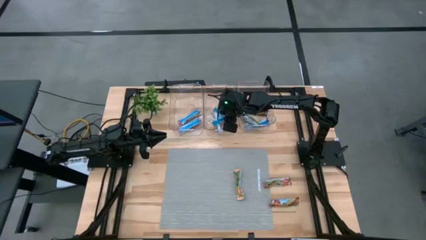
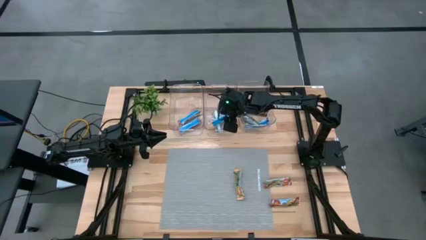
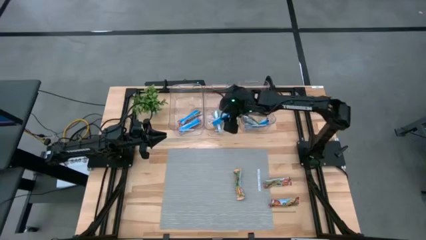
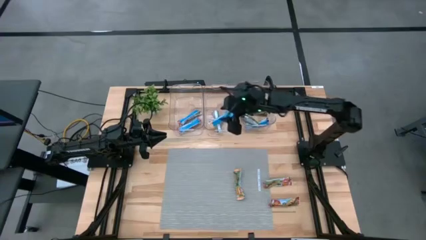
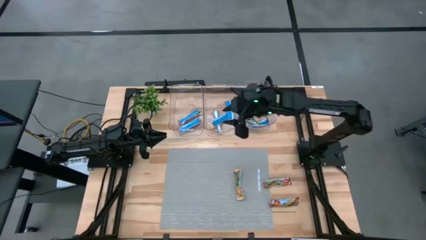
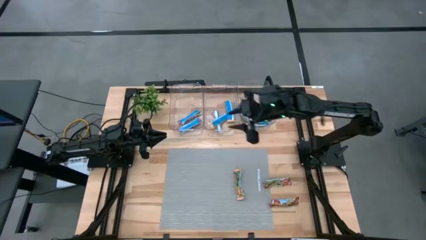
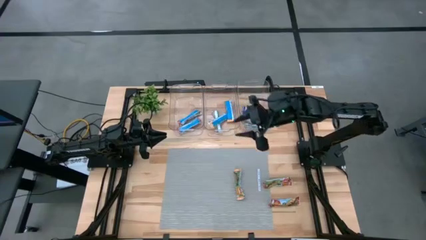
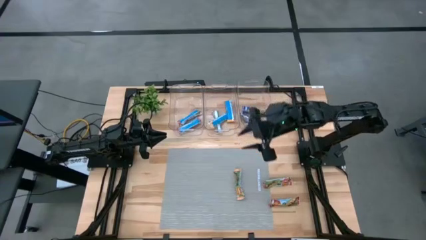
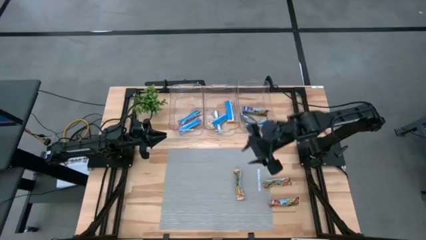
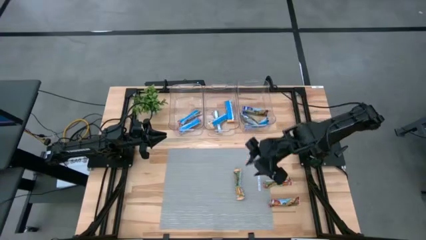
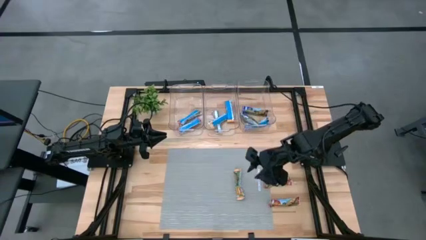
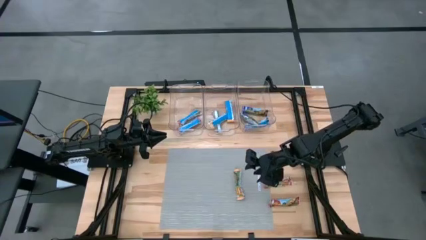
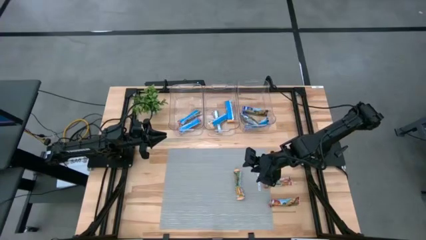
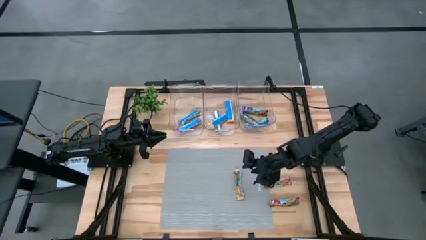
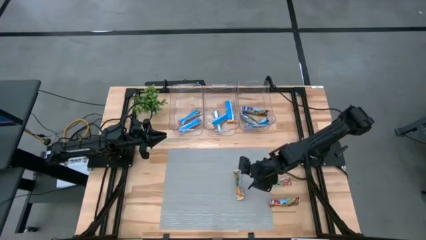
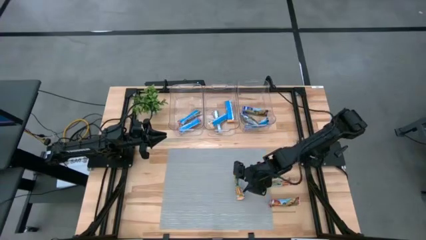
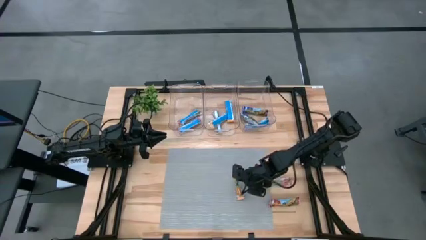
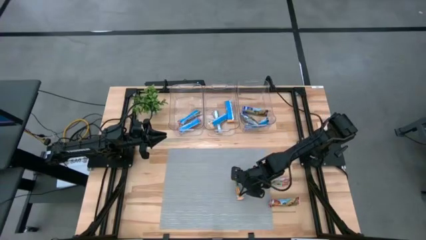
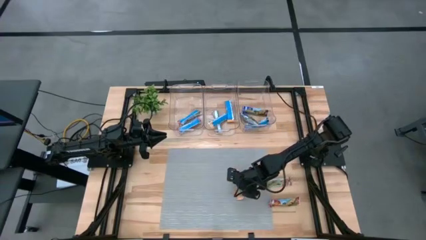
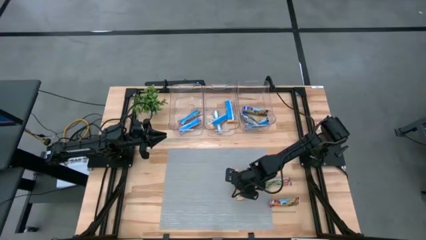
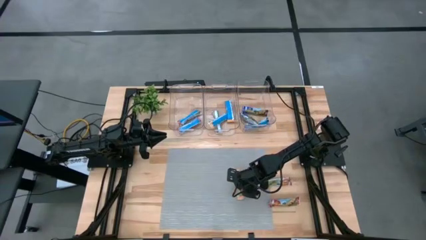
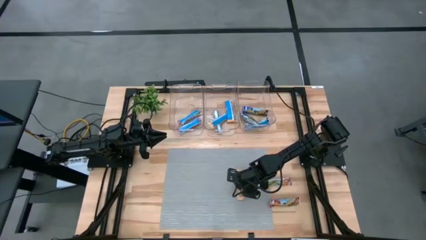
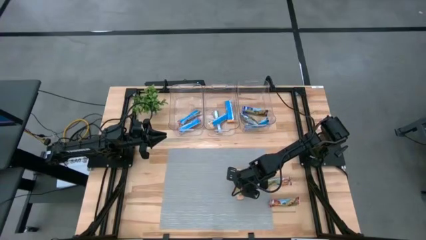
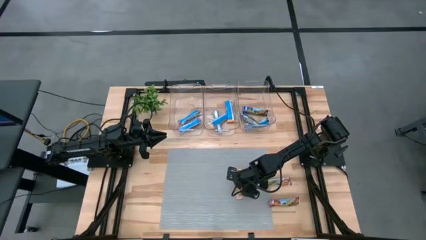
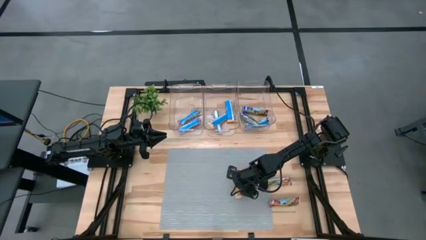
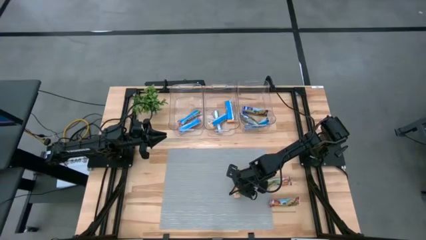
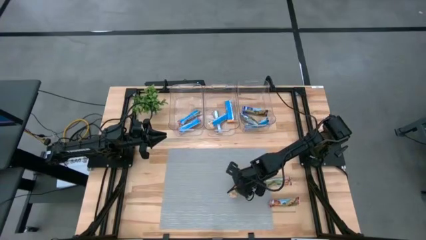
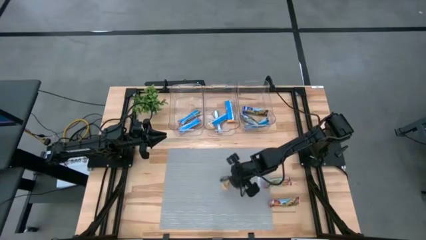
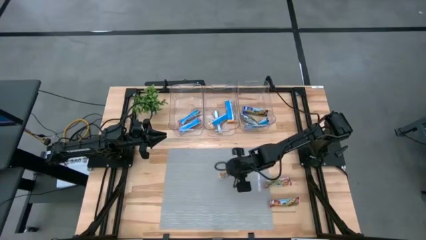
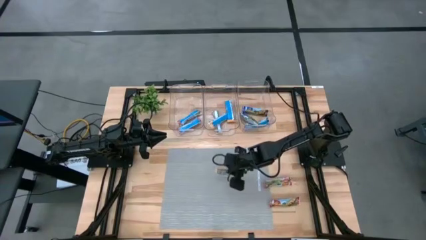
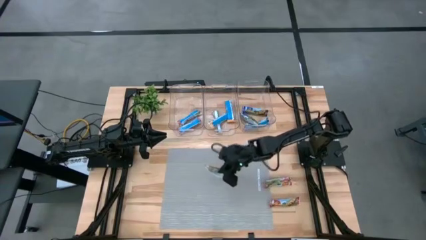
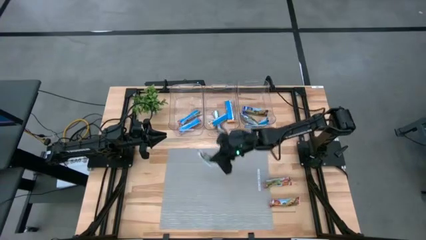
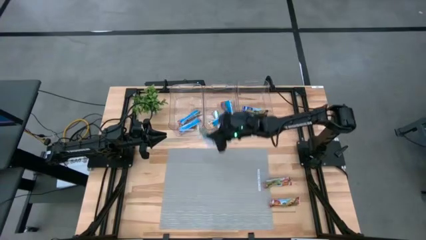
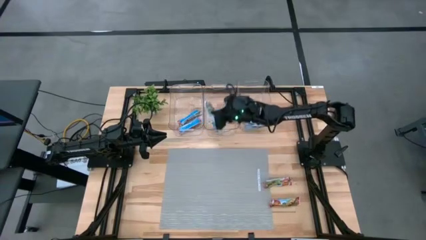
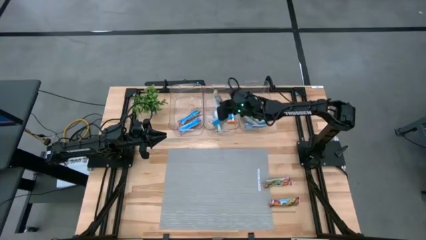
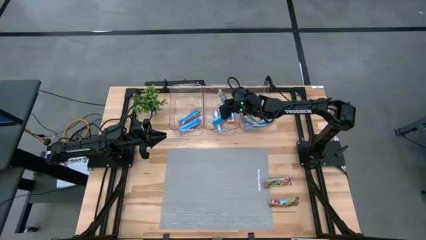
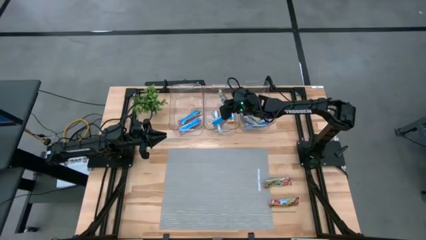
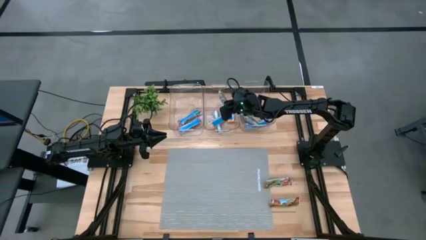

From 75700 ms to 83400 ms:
Task: Pick and place Granola Bars by type
Put the orange granola bar into the middle transparent bin

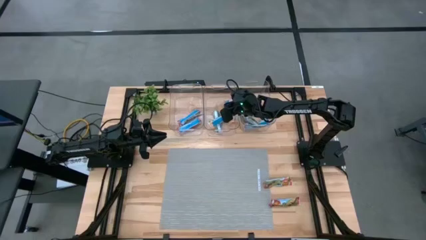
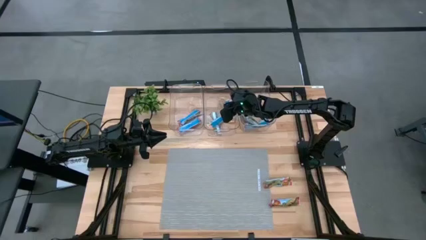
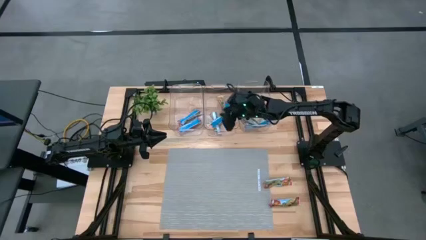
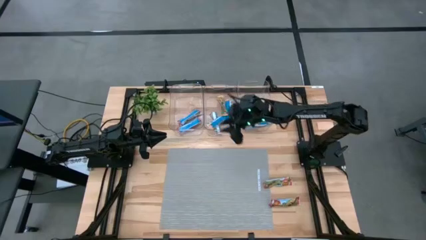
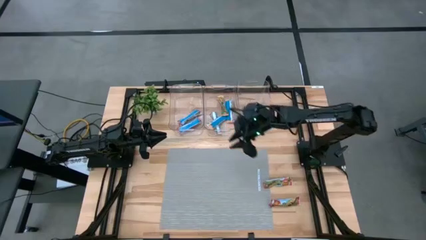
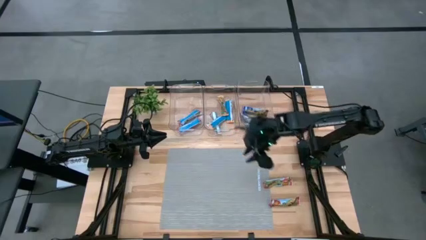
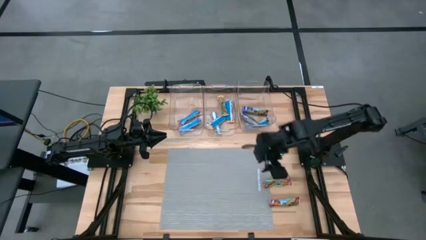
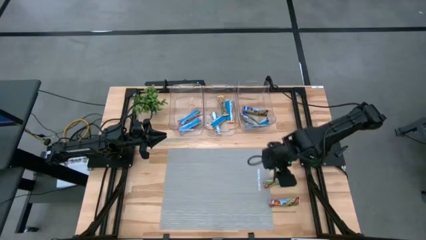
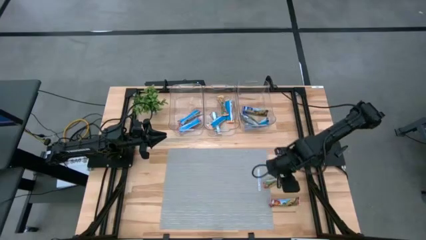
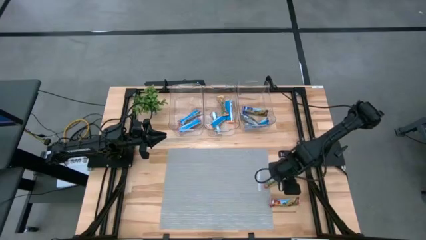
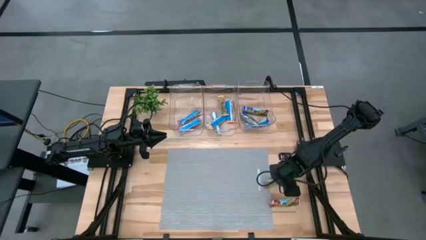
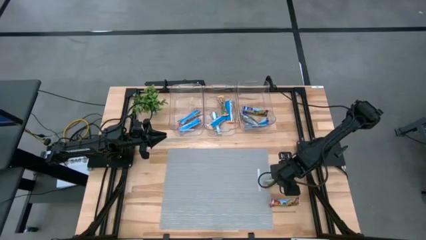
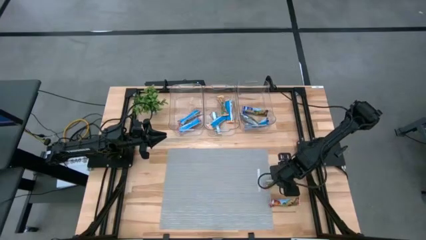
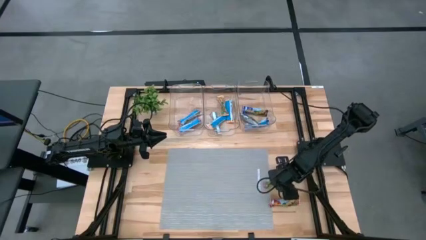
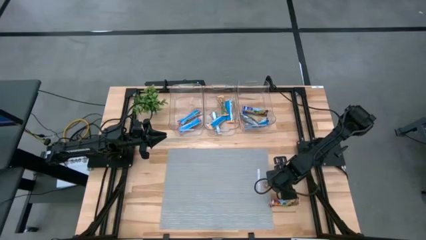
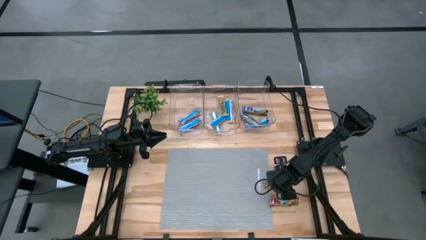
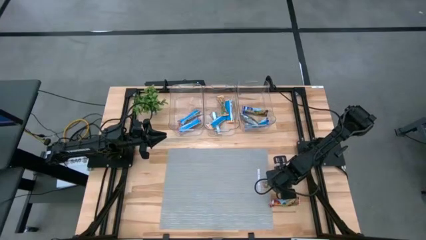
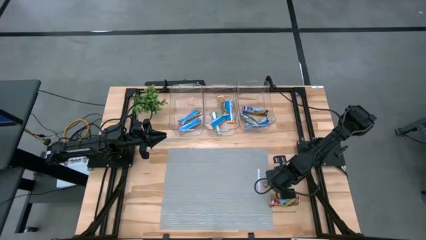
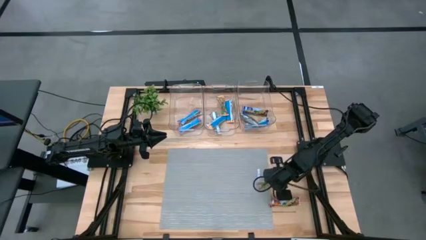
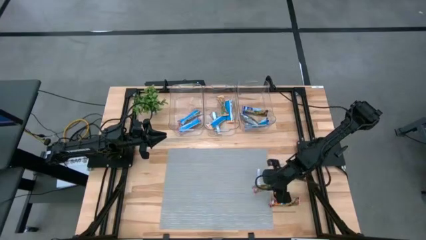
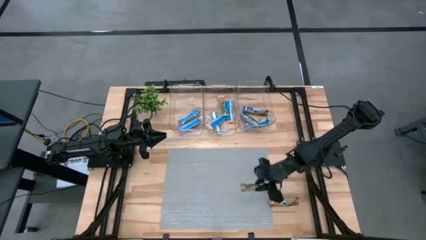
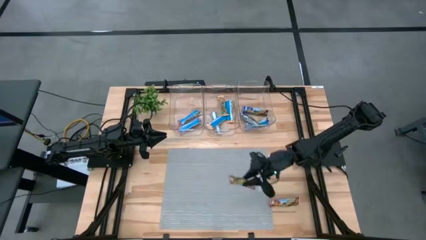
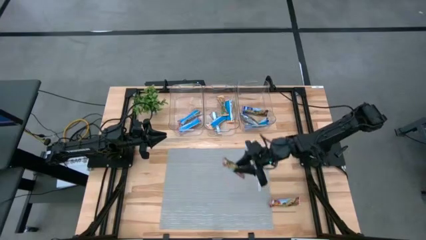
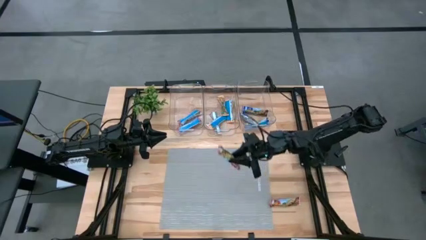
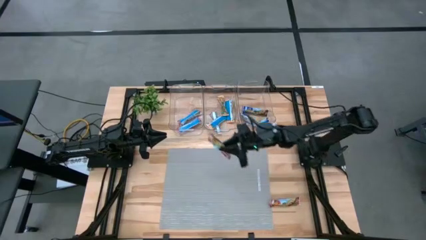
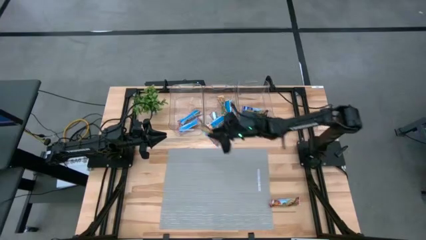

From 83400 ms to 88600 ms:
Put the red granola bar into the left transparent bin

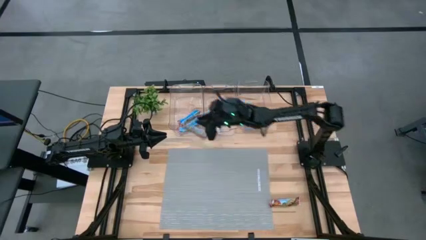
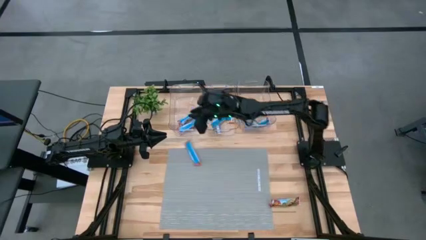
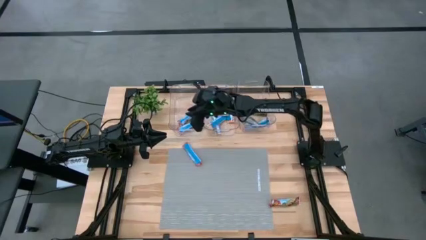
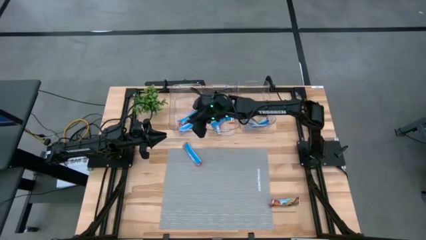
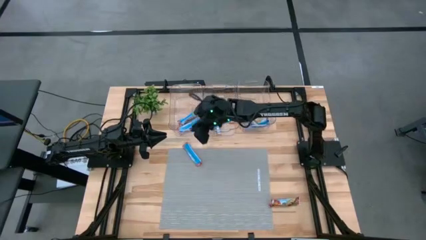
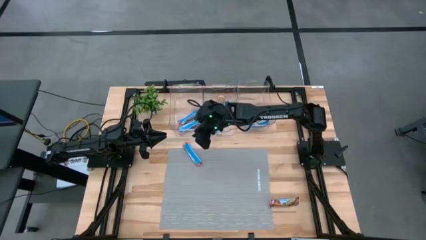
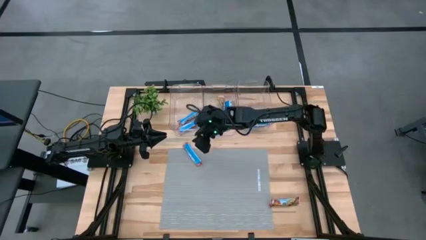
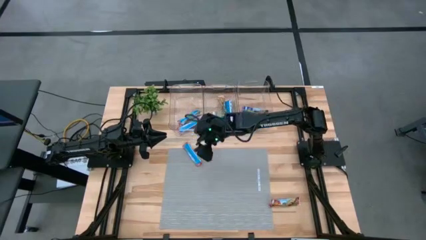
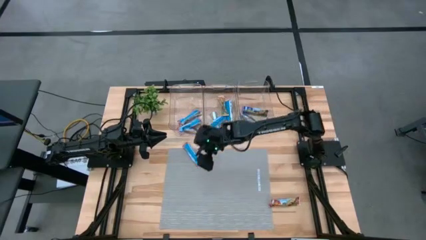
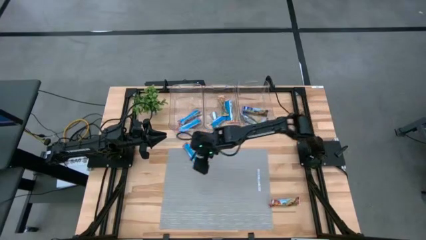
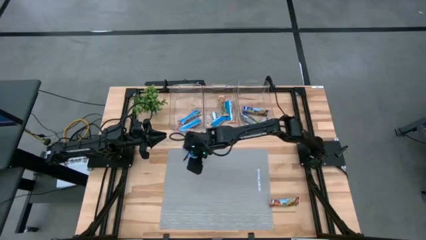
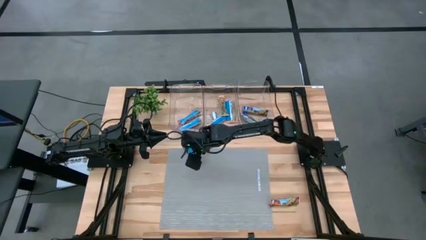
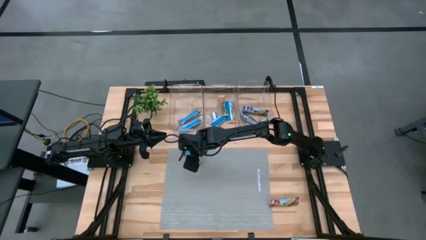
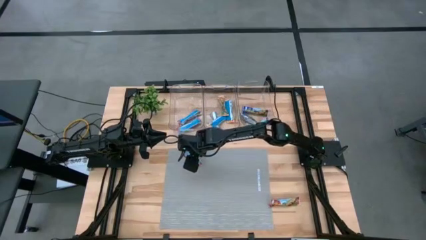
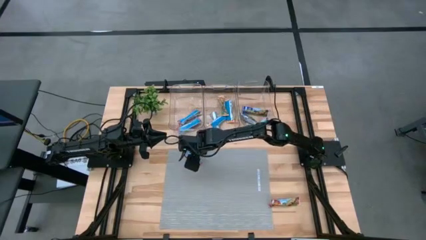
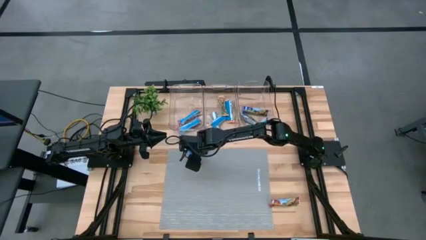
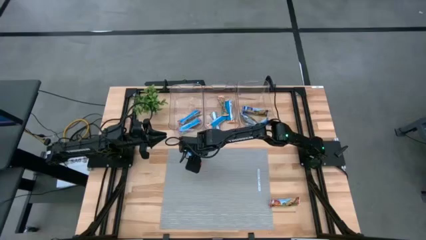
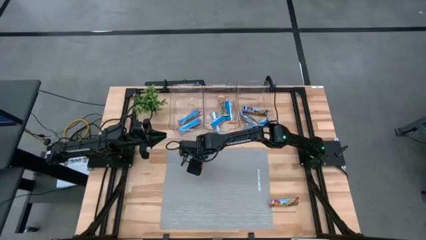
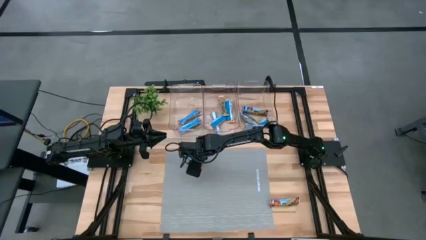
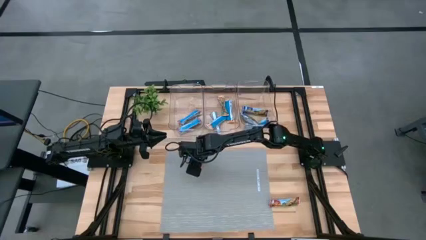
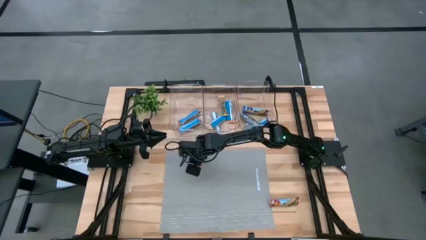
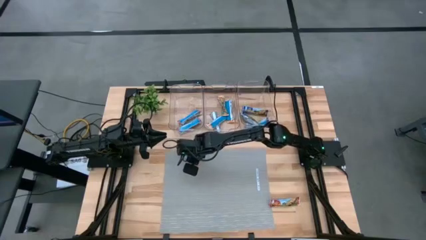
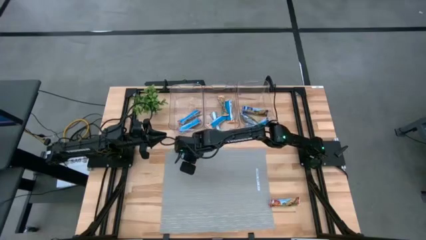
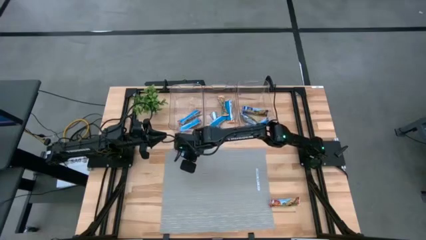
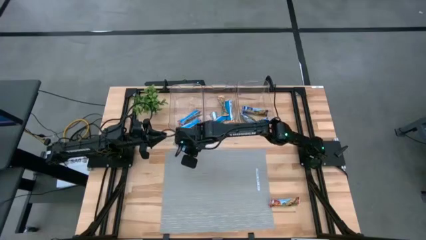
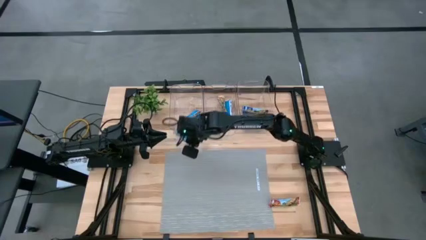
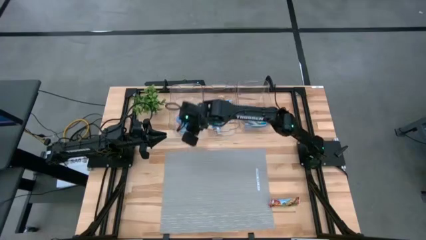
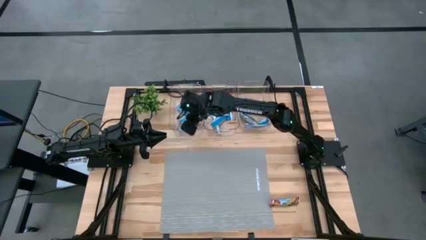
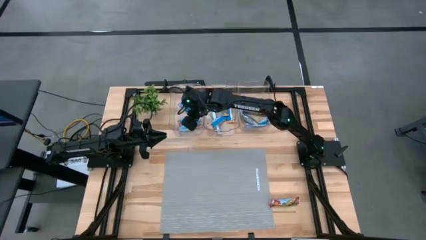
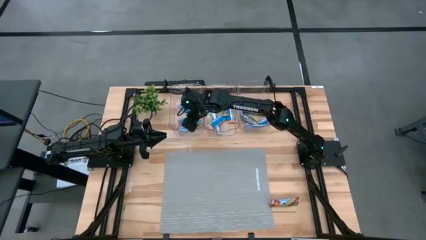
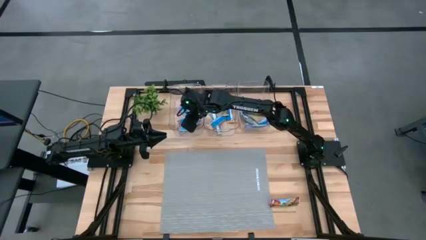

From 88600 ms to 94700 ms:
Put the red granola bar into the left transparent bin
